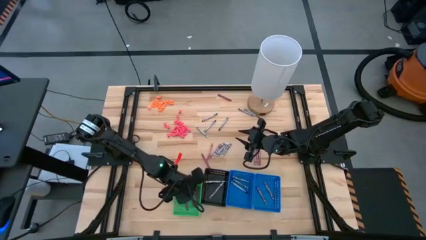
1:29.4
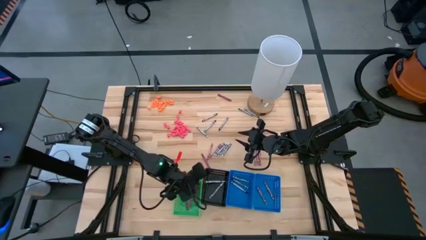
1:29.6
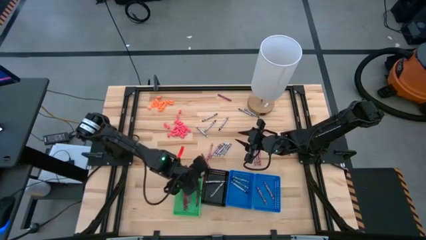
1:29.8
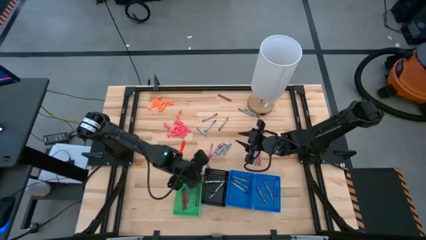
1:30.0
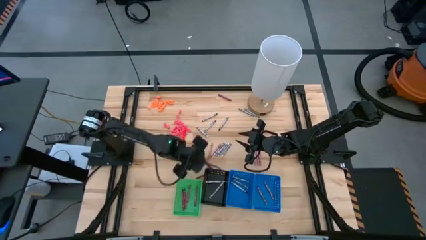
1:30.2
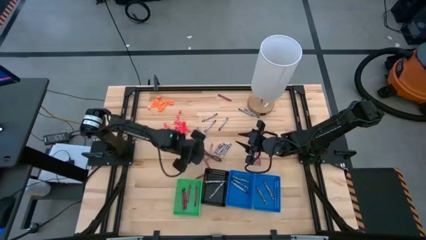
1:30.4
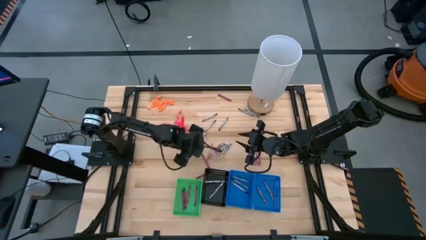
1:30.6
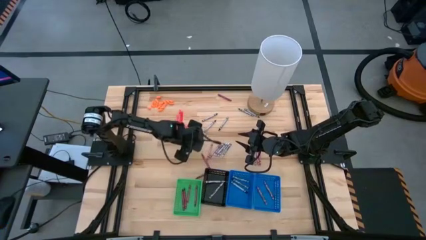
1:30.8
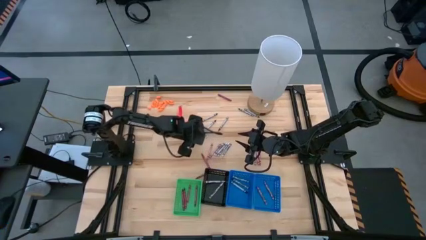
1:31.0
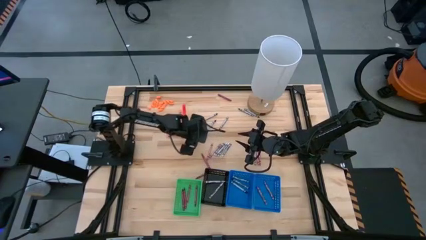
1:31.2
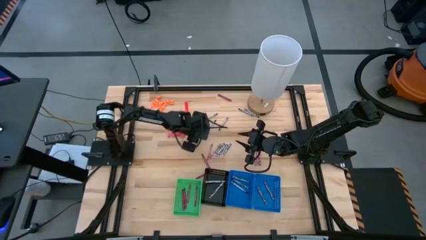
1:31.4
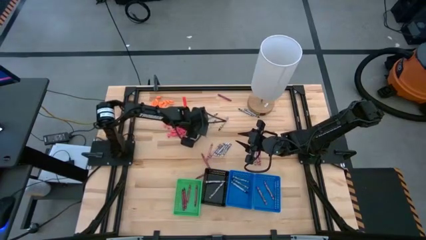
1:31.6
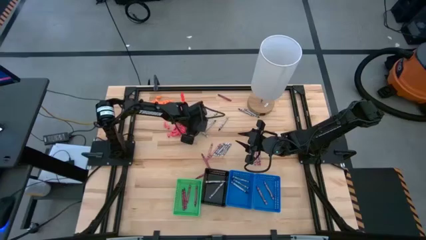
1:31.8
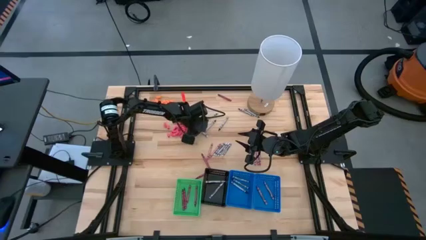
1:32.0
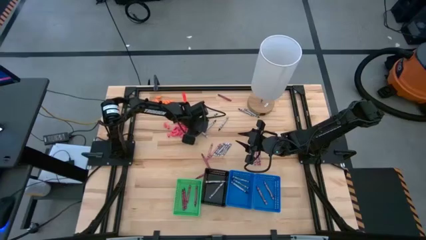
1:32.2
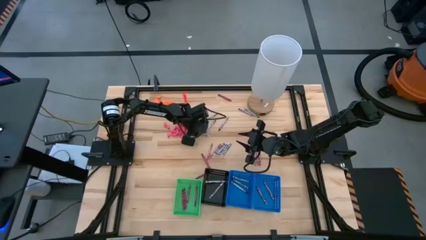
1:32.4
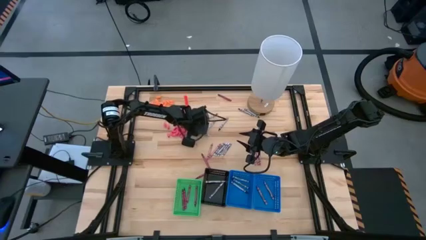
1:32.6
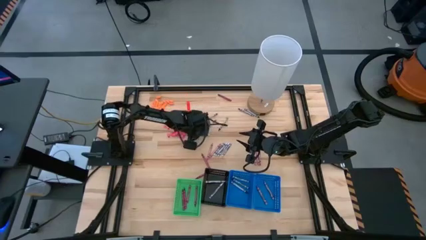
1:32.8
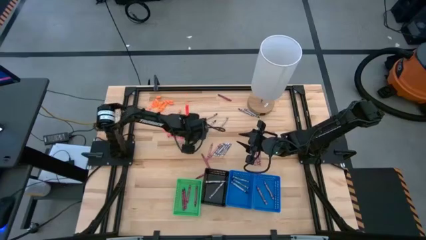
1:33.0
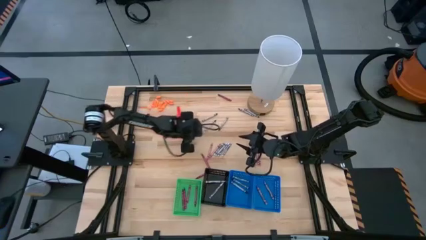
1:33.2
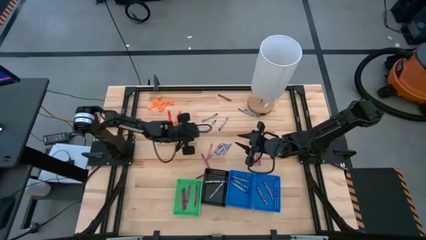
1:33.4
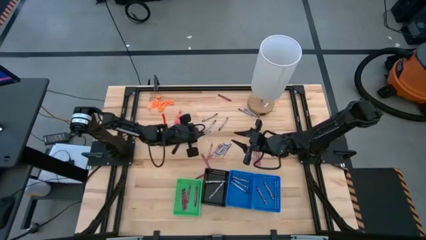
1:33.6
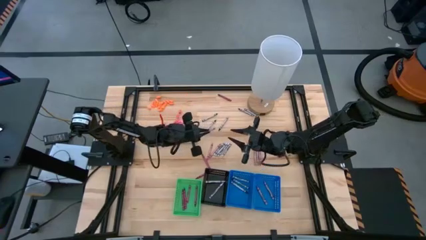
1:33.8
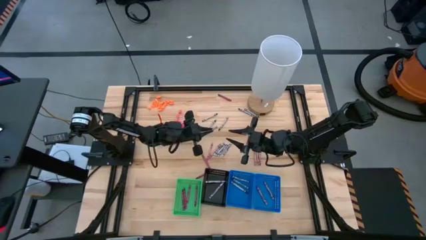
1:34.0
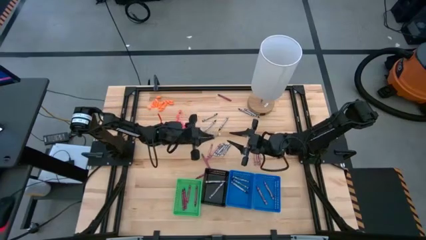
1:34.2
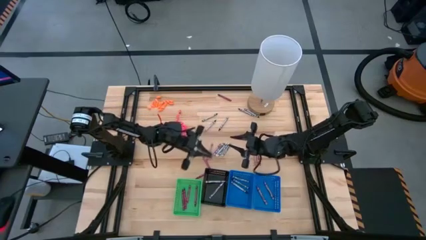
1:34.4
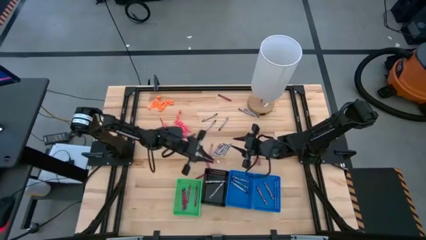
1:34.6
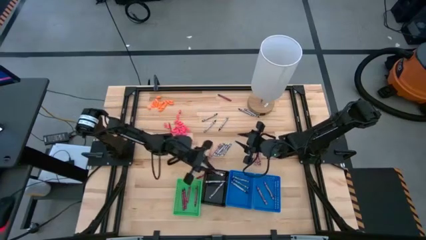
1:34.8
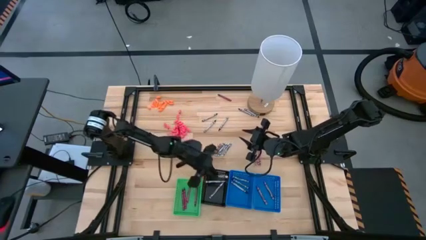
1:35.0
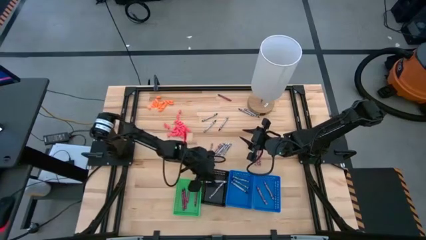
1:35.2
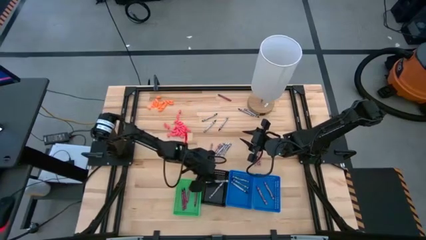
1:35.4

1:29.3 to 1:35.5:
Task: Sort crayons
Put the white crayon into the black bin

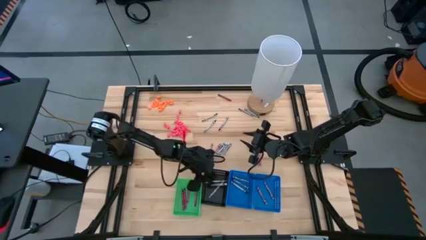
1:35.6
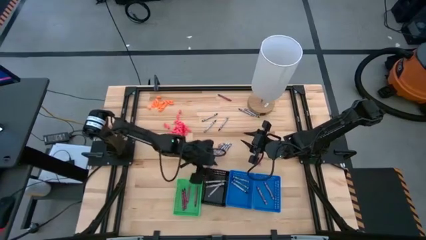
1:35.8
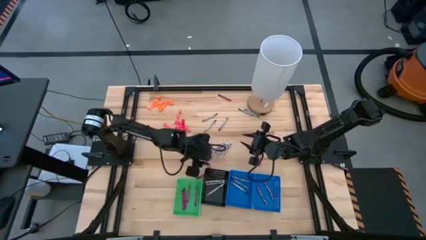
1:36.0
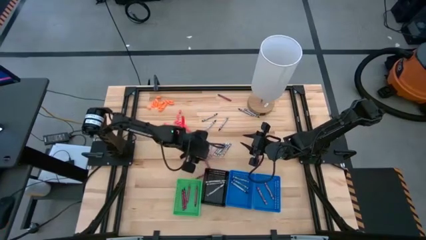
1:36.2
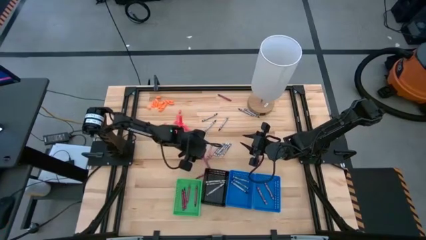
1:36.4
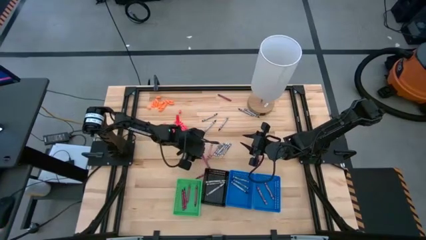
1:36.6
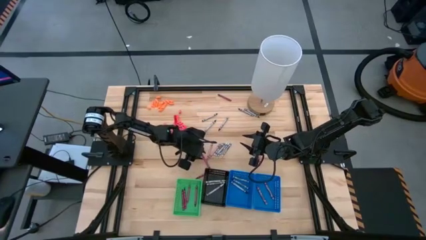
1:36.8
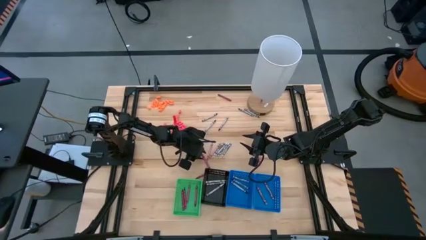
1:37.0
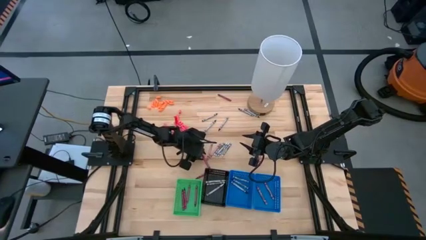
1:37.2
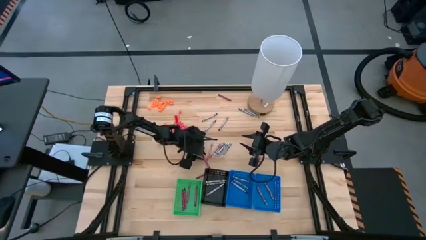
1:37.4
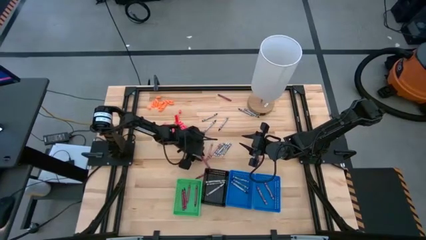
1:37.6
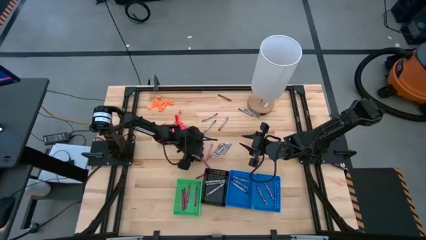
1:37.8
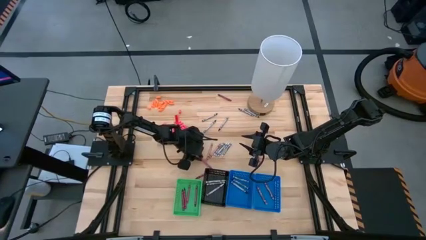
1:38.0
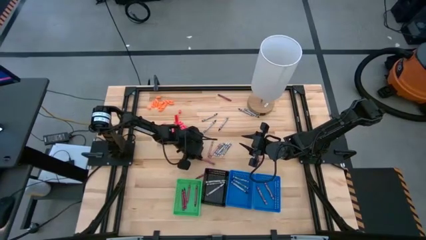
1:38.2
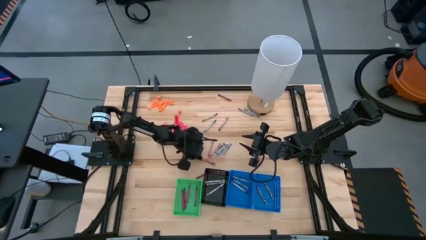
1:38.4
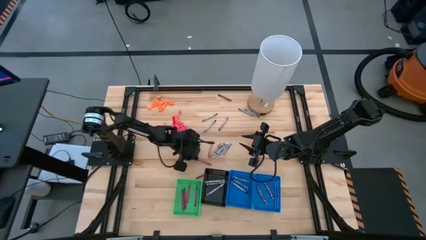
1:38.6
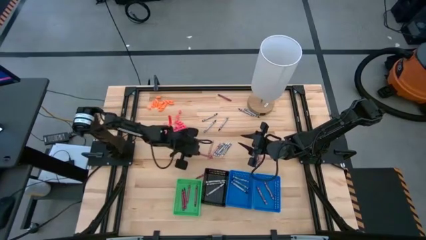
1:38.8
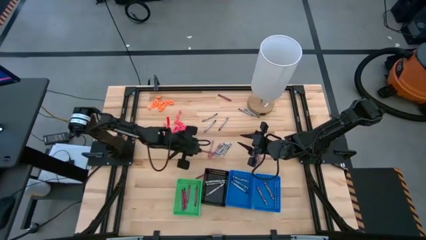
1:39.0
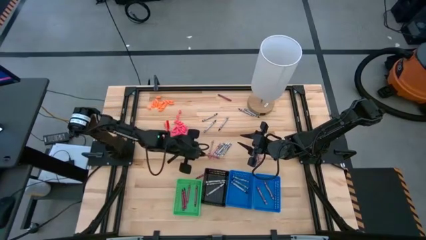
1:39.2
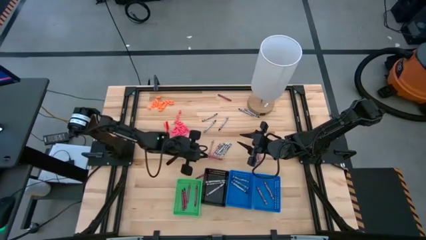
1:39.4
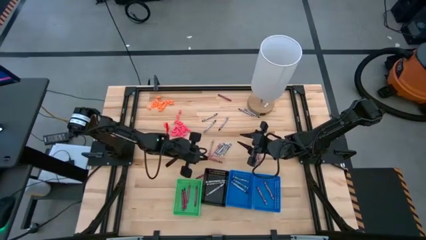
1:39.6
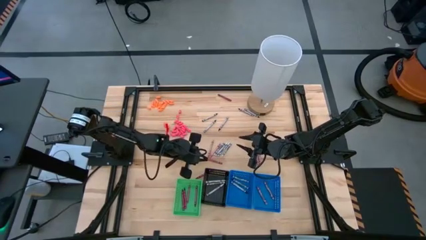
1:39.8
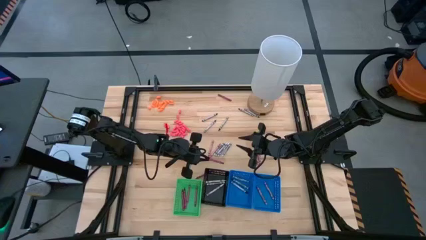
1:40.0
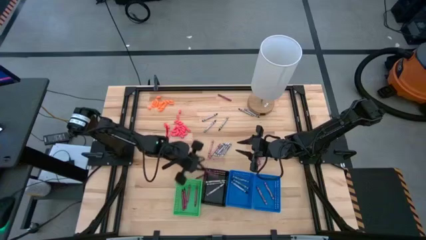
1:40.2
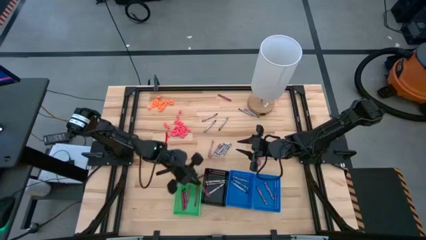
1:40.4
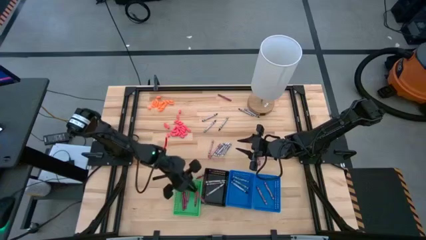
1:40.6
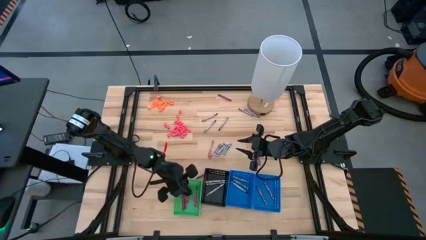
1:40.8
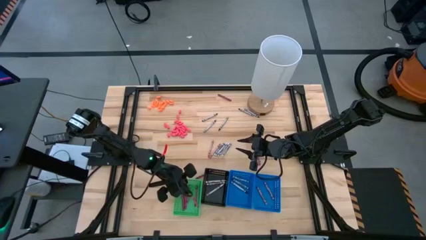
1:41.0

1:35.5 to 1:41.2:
Put the red crayon into the green bin
